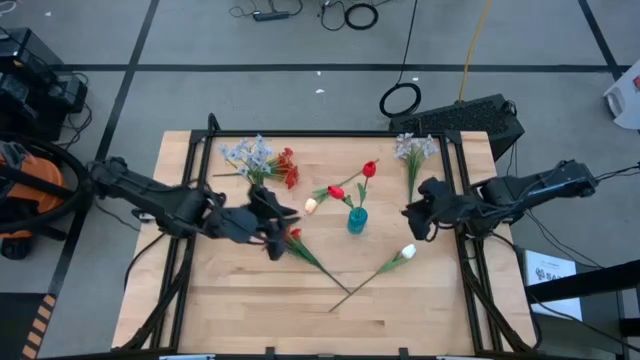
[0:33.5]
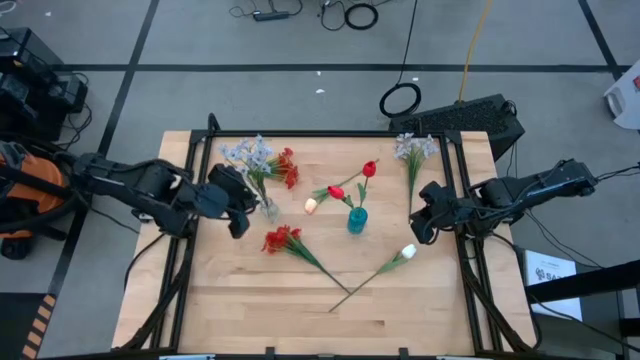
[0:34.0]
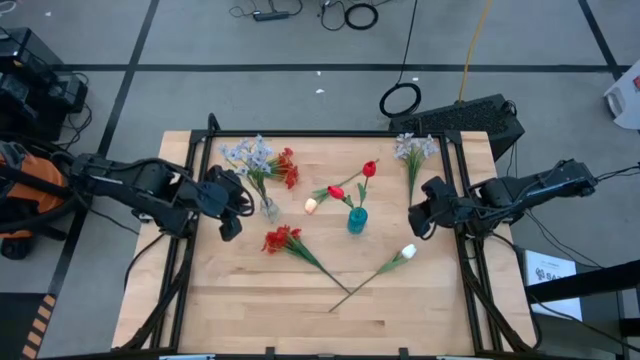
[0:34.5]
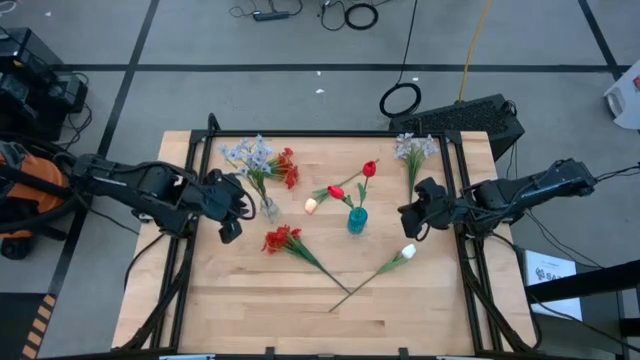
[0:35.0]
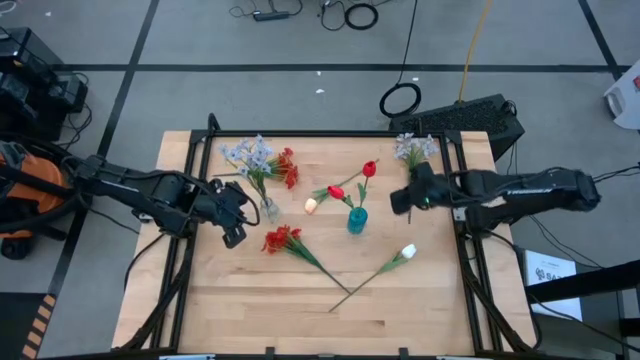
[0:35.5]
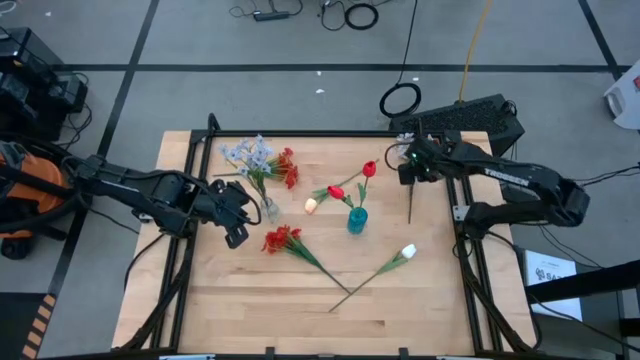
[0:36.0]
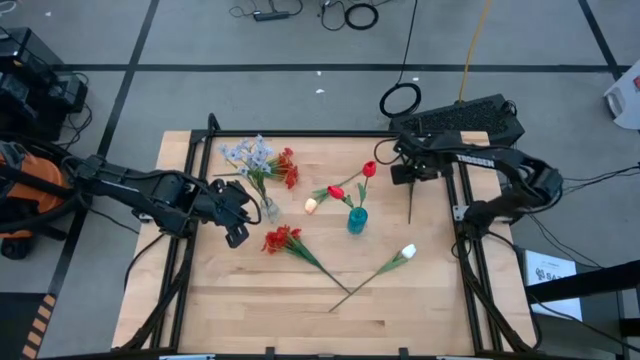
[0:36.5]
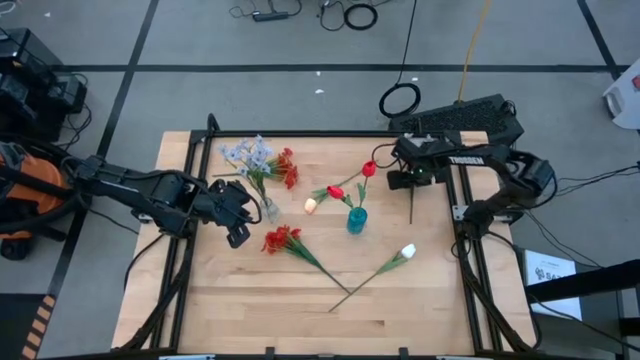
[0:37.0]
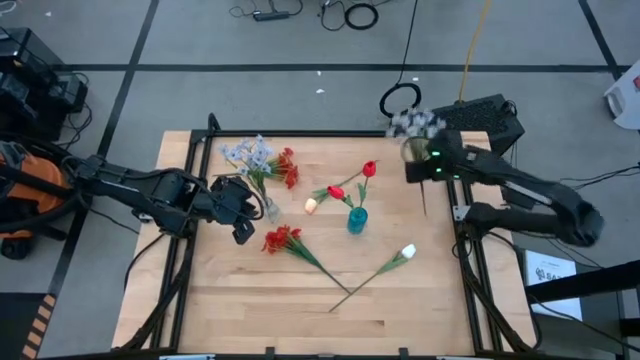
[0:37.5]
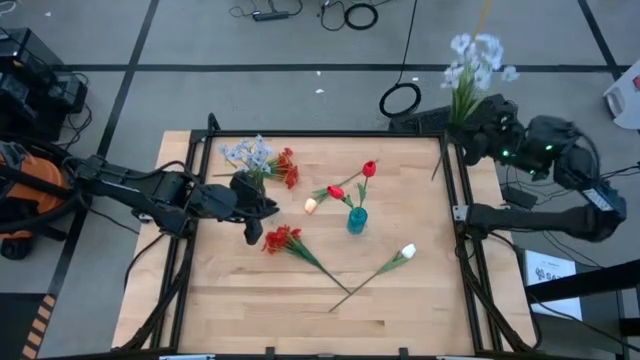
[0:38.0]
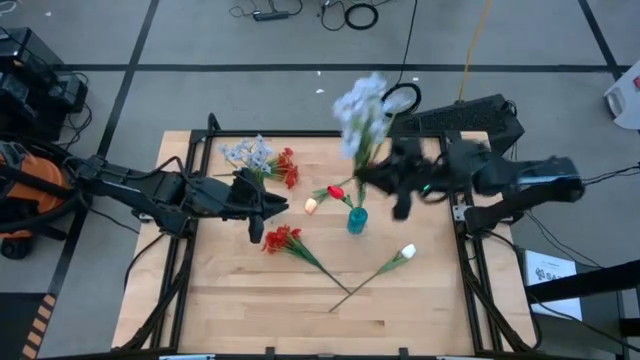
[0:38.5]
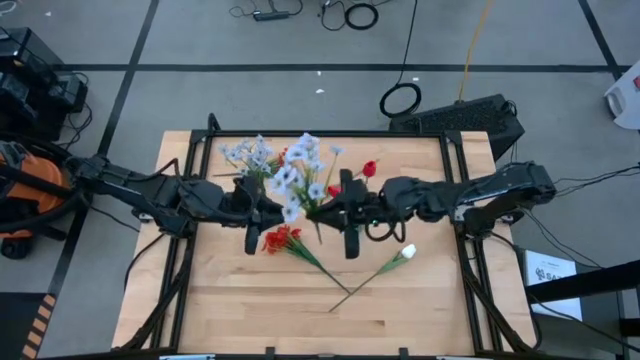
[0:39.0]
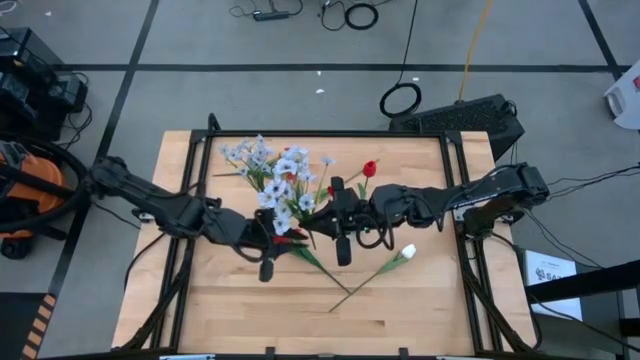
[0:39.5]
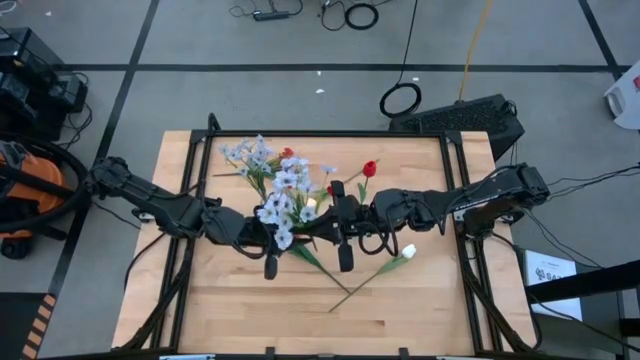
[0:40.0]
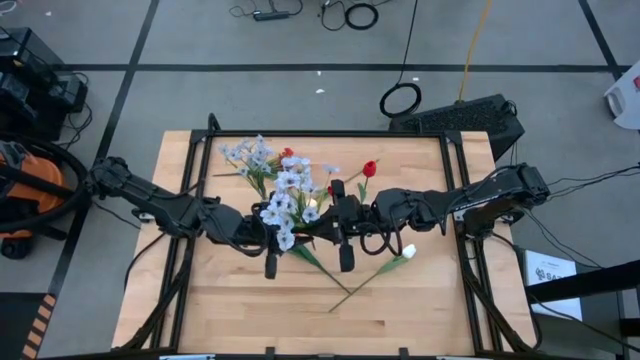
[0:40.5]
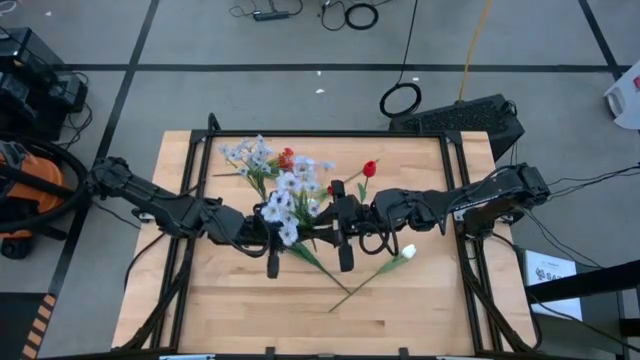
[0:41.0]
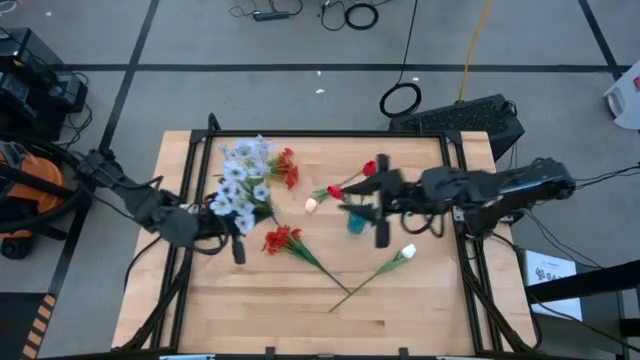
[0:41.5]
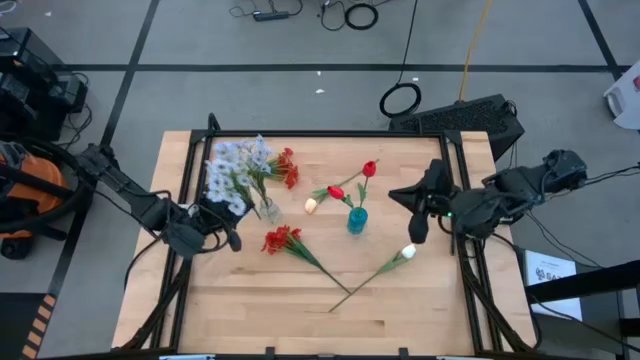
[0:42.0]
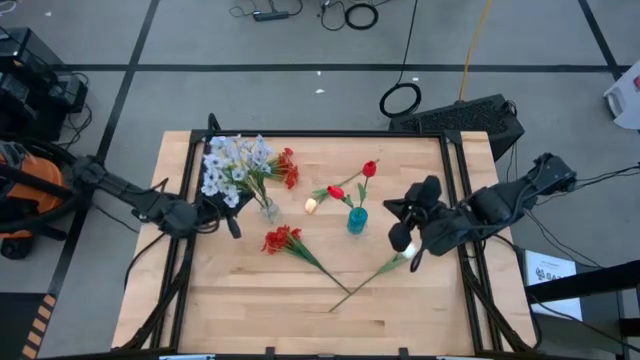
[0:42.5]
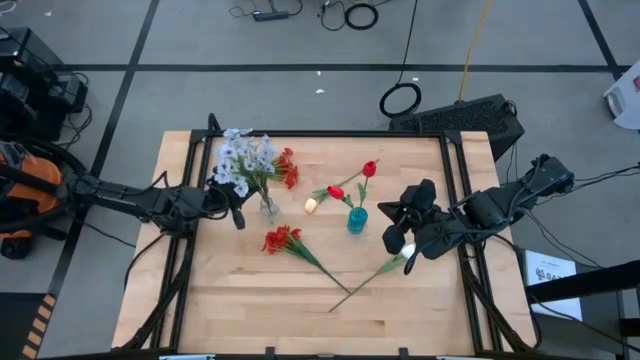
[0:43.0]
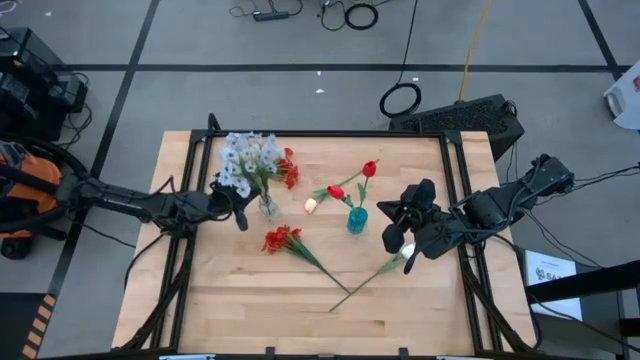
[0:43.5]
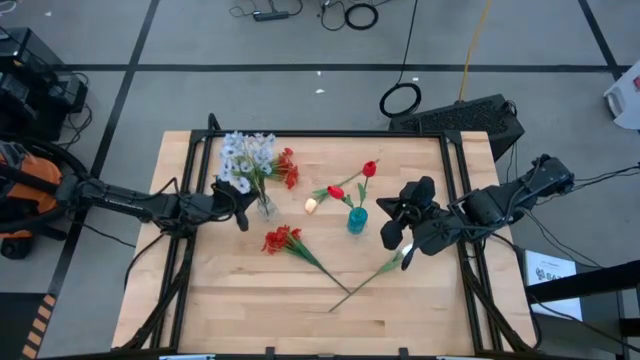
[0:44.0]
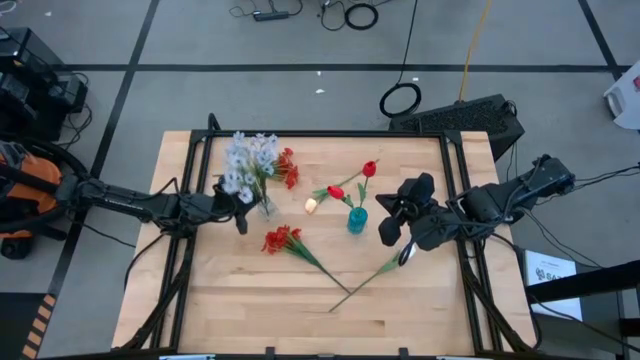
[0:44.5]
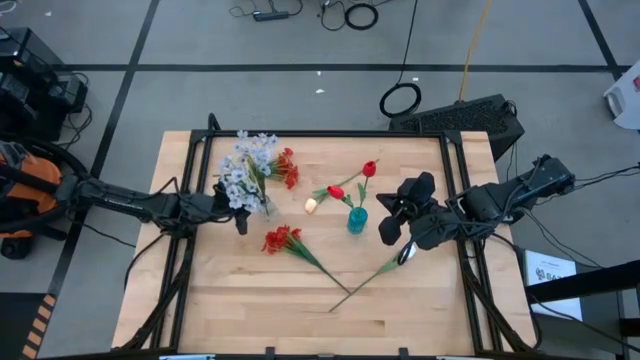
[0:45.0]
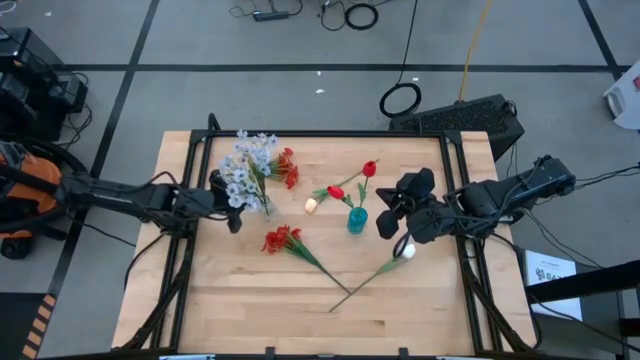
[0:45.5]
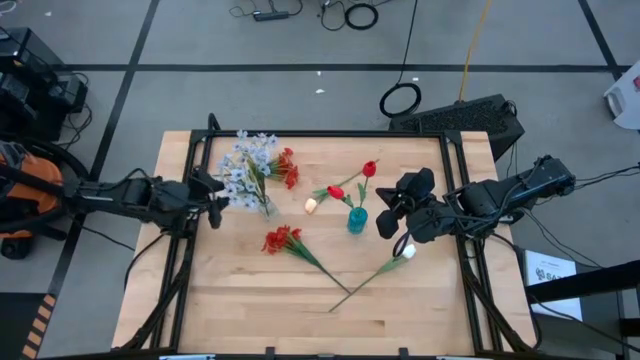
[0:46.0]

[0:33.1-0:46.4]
Task: Sort flowers into vase by color
Put the white flowers into the transparent vase

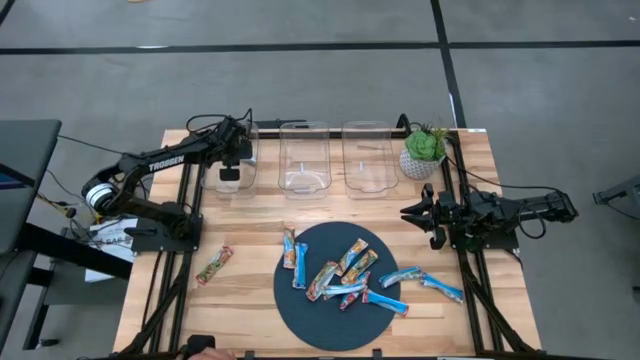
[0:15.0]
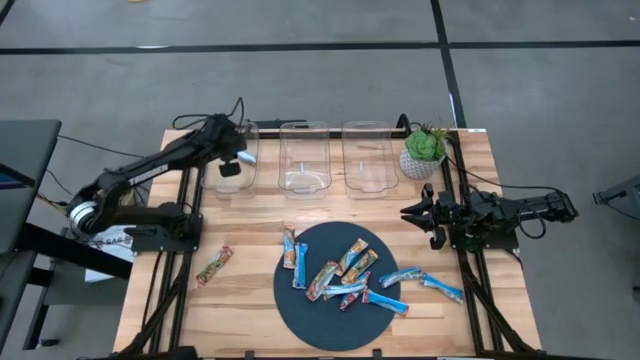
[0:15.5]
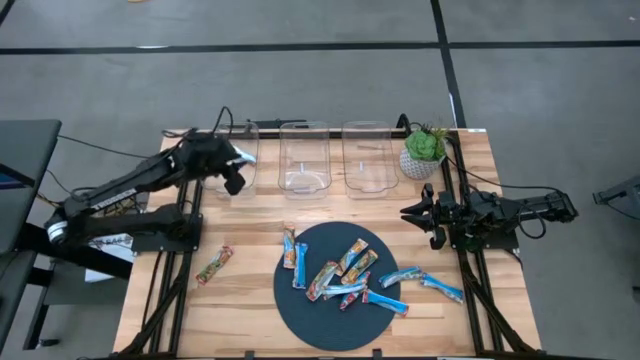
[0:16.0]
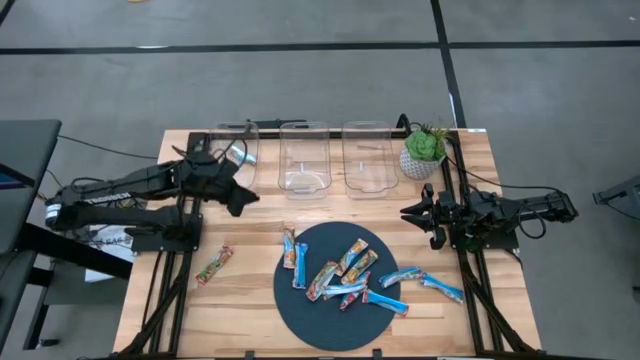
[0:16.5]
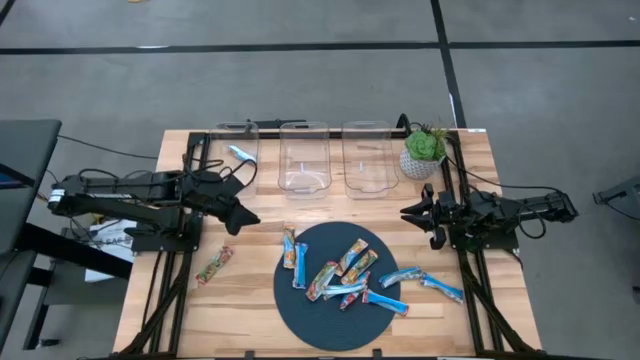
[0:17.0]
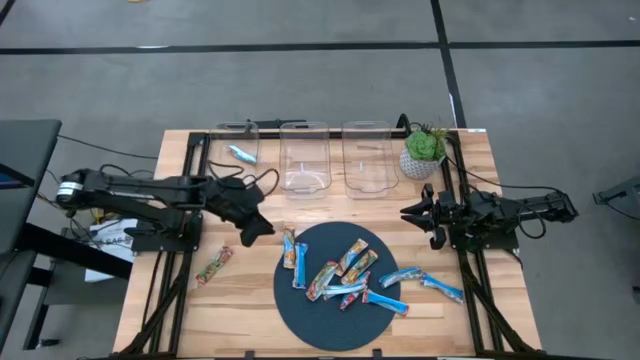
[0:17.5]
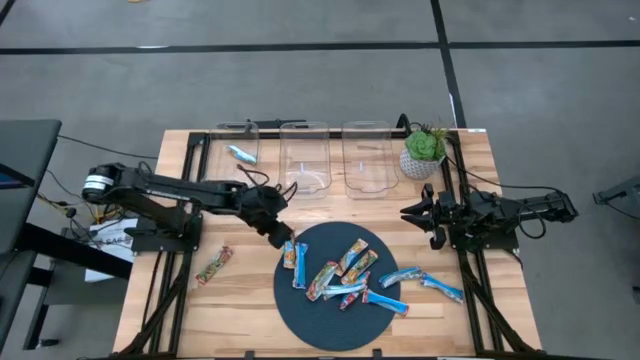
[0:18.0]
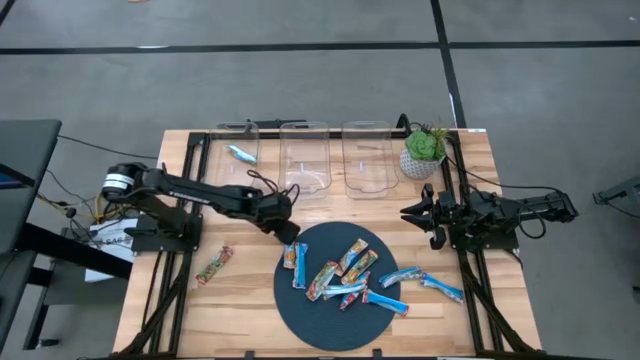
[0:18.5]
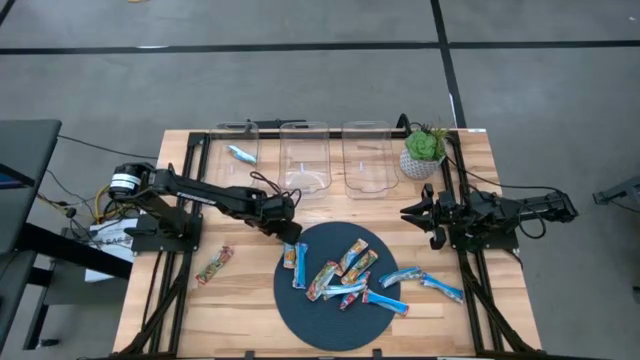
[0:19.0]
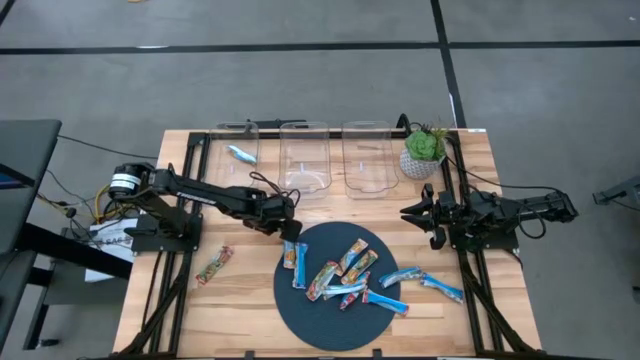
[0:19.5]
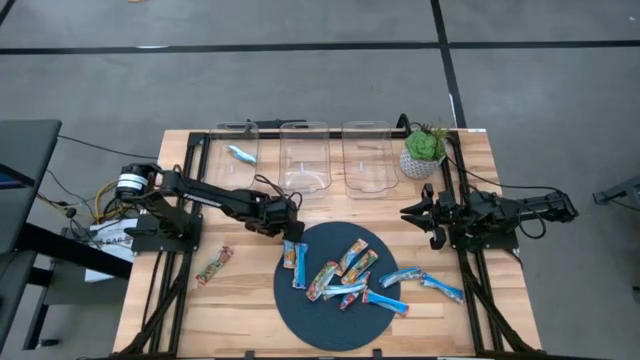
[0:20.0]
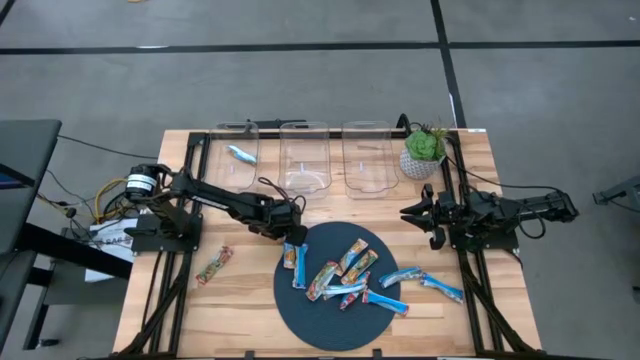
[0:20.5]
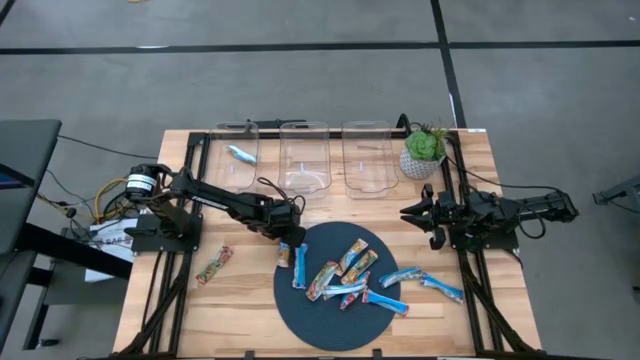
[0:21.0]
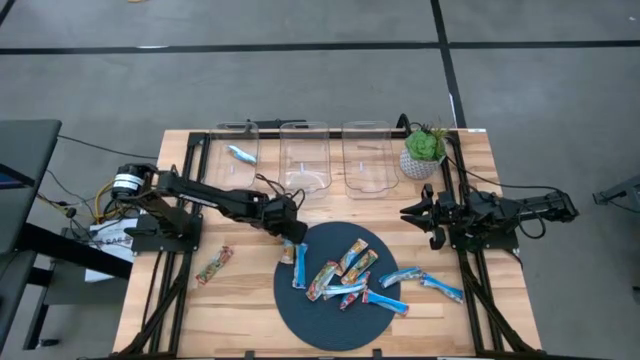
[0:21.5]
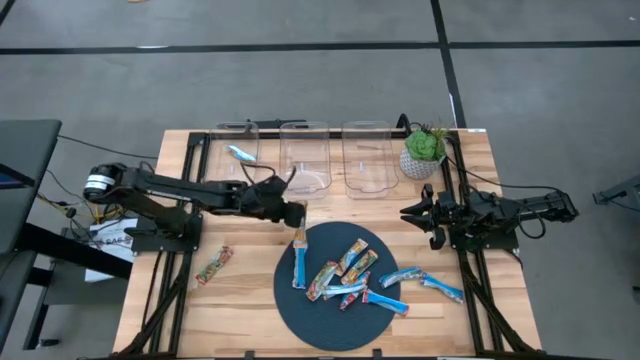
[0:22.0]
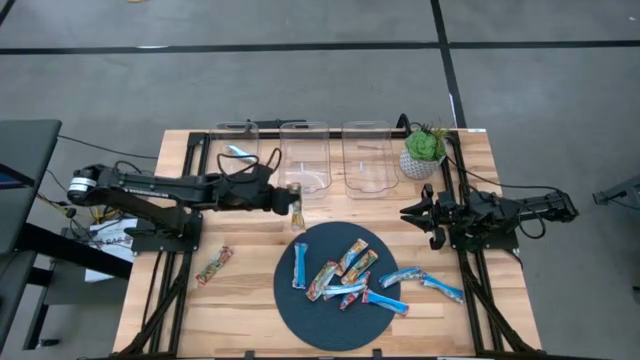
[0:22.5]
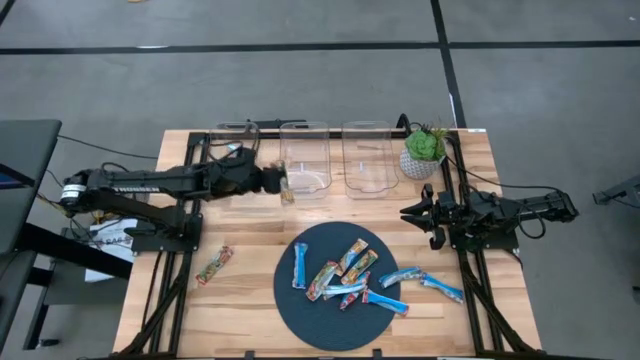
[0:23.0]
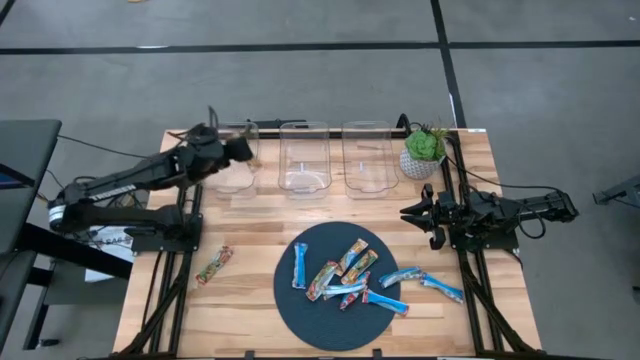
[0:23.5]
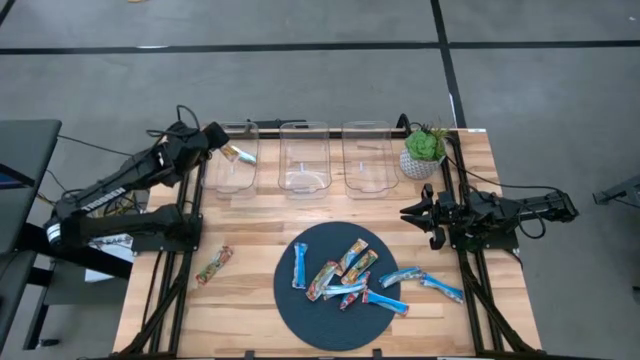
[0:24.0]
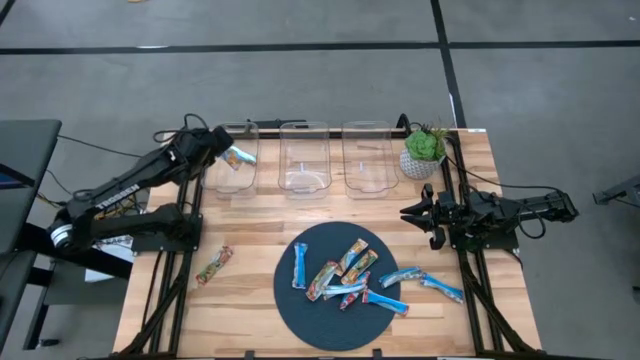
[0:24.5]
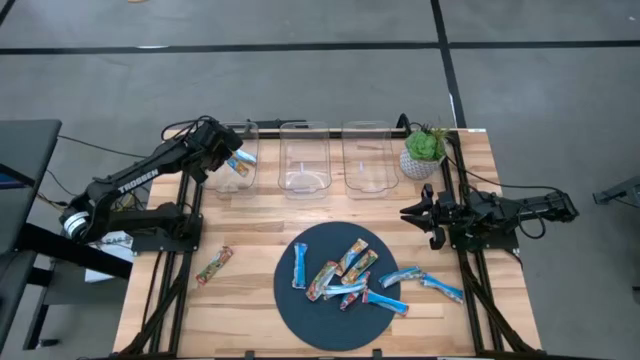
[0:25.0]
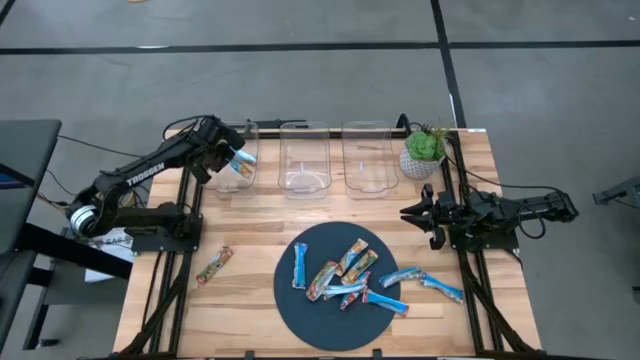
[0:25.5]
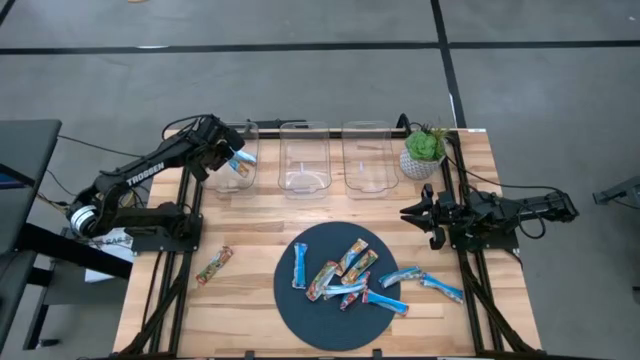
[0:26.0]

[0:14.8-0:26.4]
Task: Pick and place Granola Bars by type
Put the yellow granola bar into the left transparent bin
